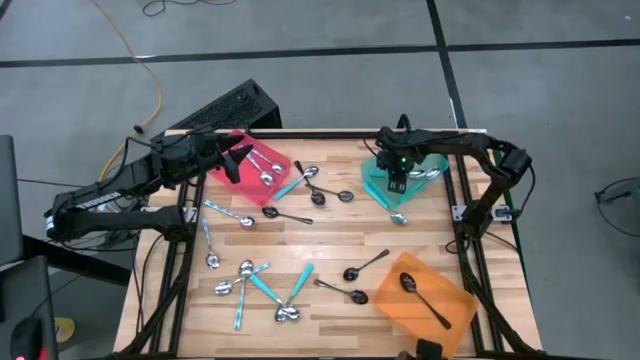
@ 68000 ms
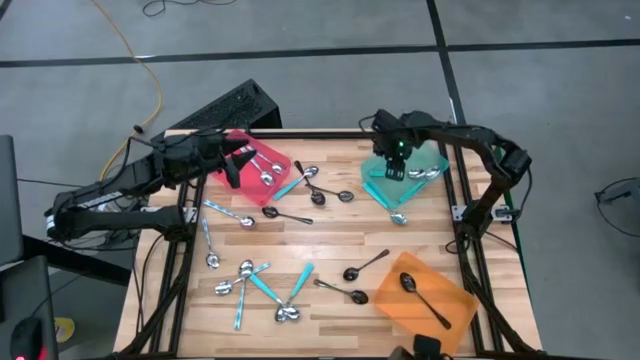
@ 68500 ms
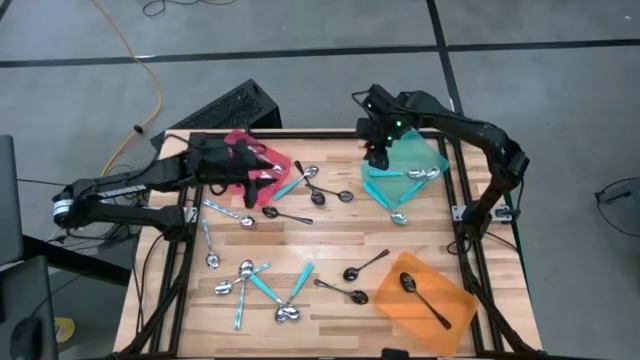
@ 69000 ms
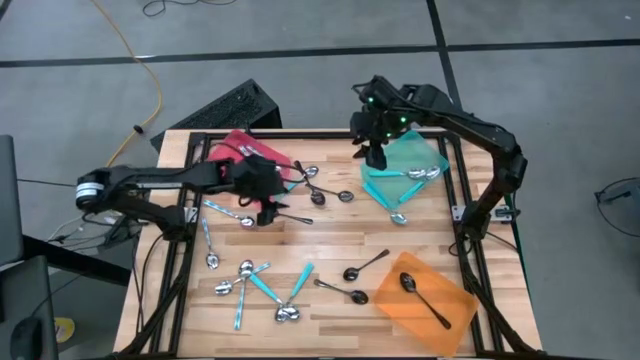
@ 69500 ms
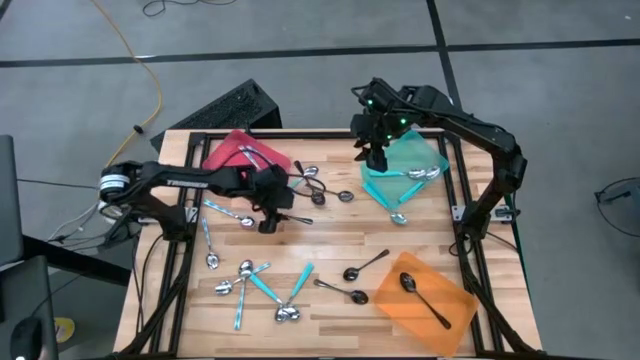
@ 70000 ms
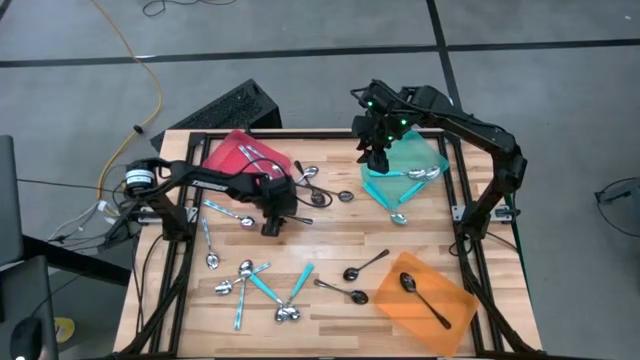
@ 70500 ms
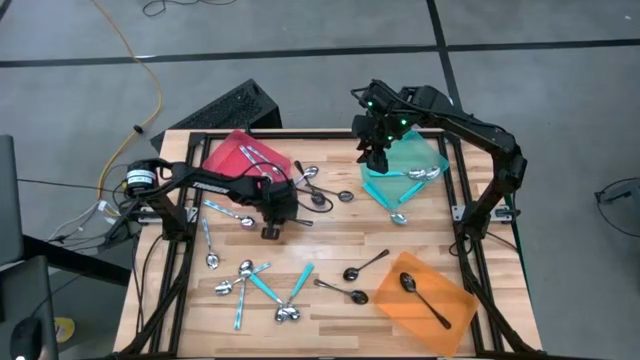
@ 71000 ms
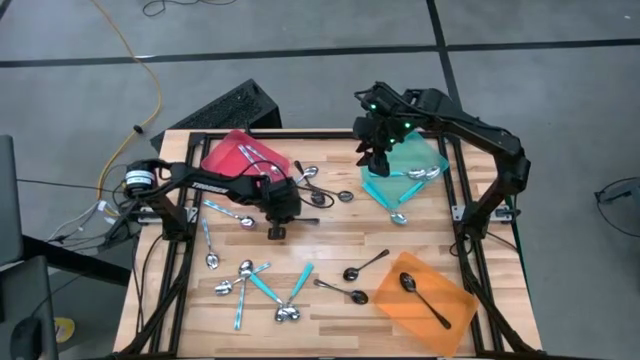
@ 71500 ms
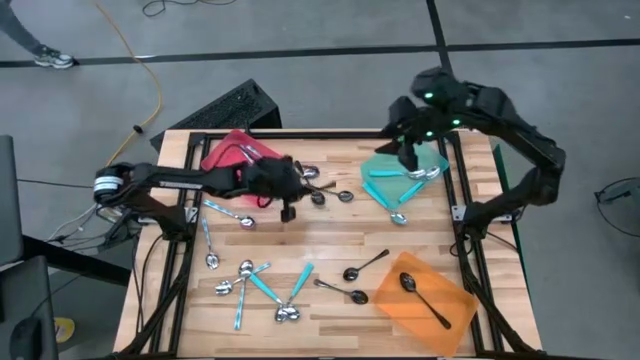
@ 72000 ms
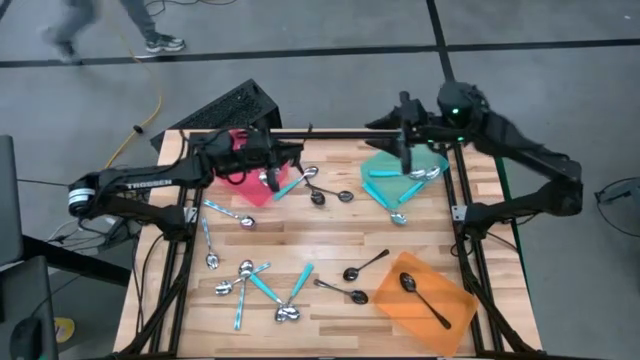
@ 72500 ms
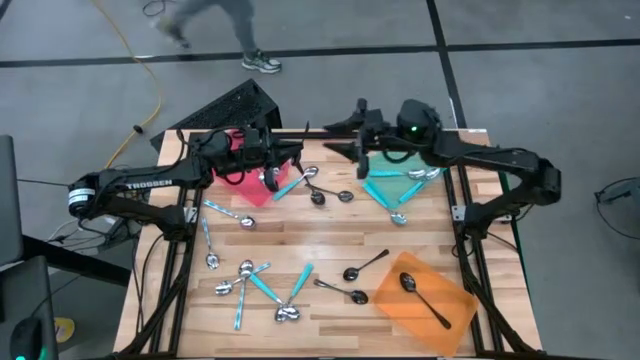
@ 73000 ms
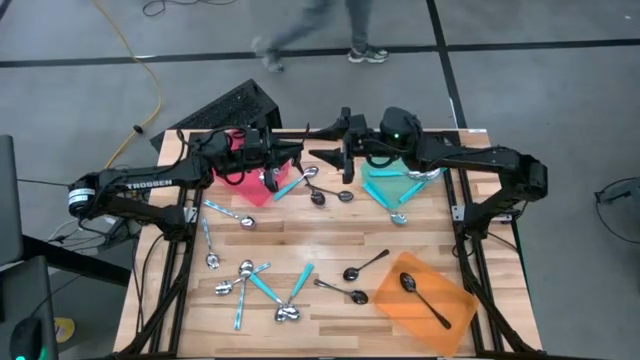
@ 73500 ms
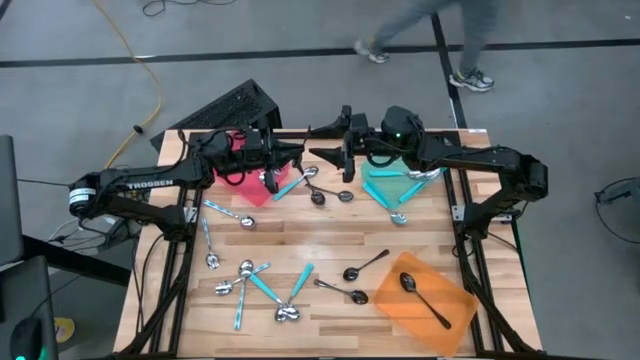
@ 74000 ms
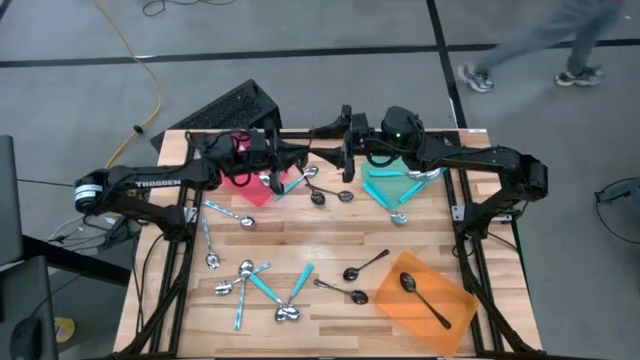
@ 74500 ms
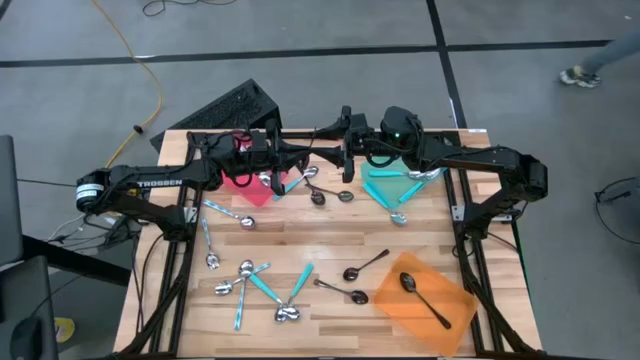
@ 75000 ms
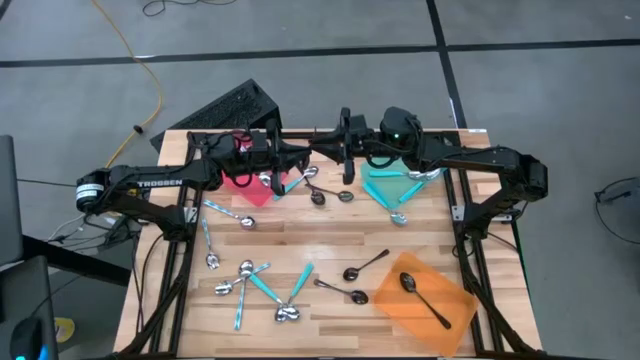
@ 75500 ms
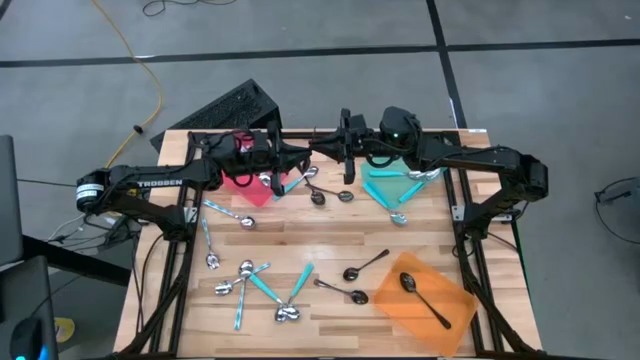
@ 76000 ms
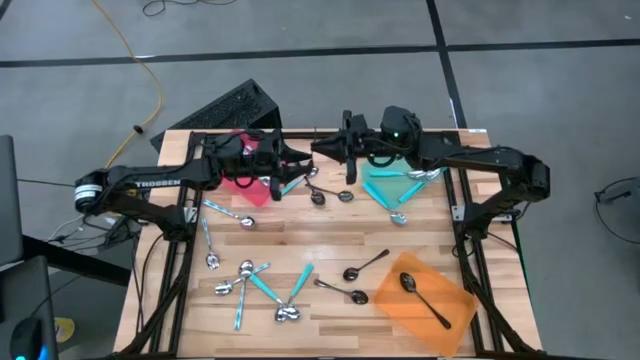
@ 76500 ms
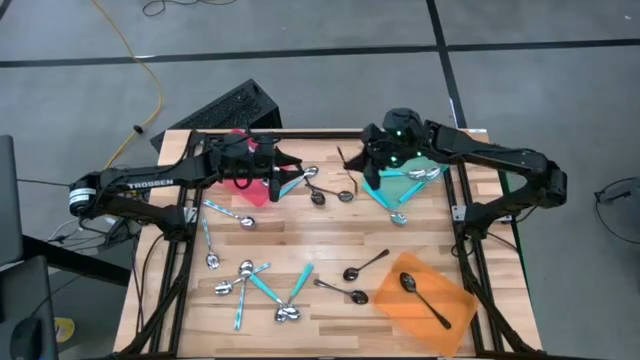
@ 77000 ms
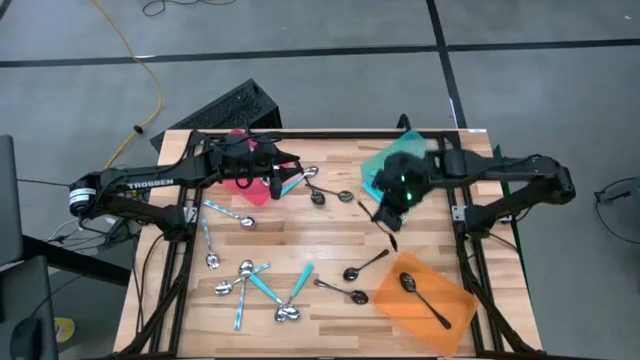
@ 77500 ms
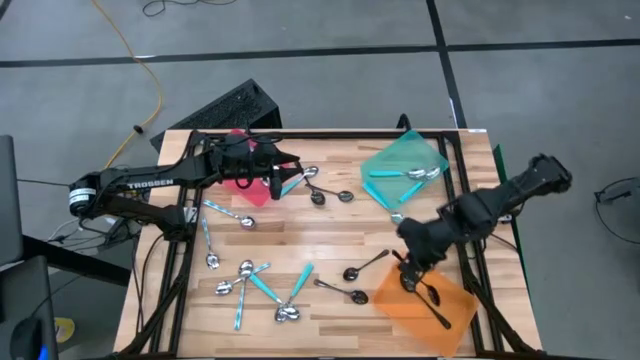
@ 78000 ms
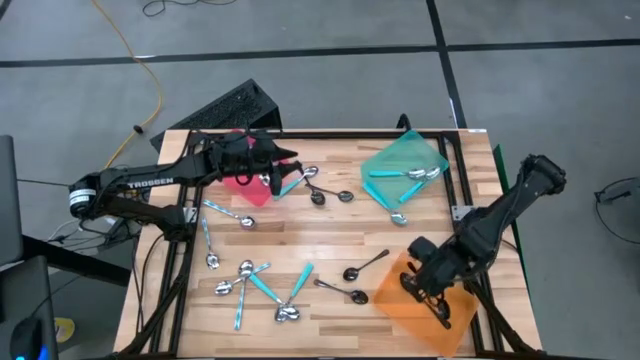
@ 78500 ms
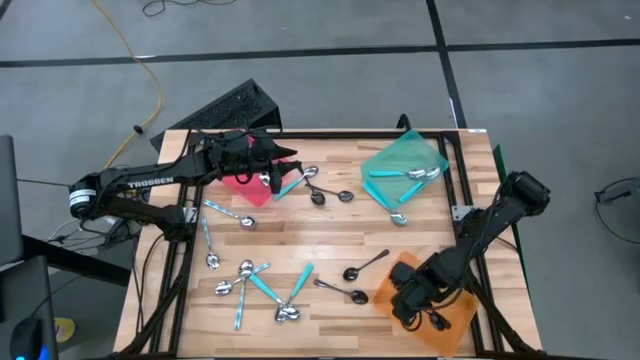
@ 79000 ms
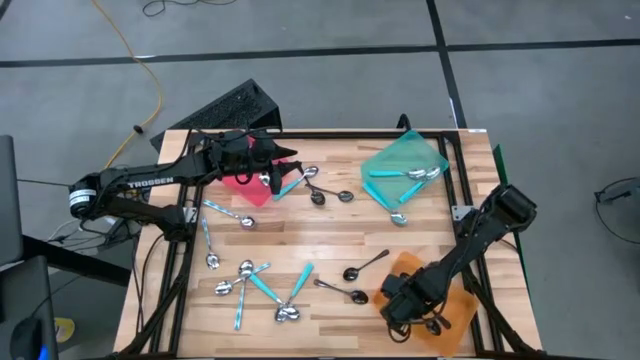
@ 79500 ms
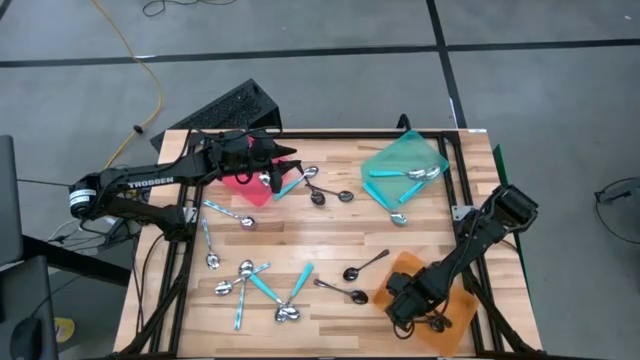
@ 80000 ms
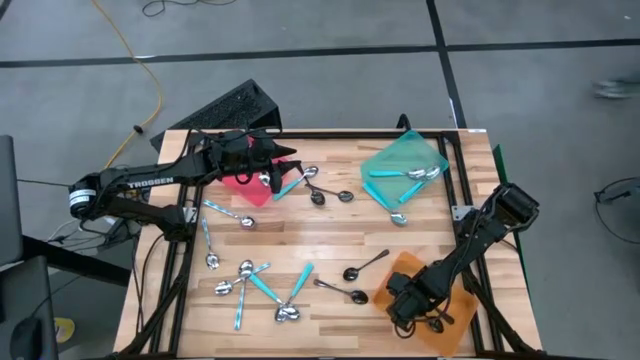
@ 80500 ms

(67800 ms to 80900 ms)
Task: Sort silverware by color (type)
Put the black spoon into the orange bin

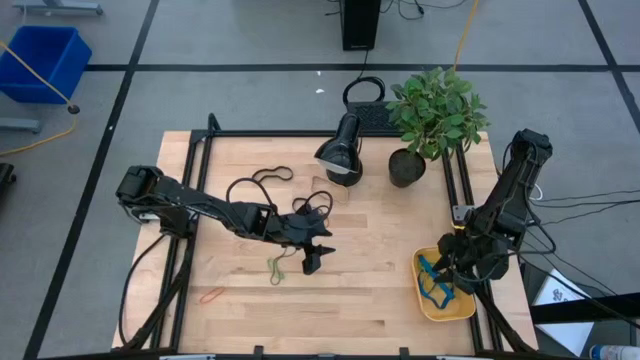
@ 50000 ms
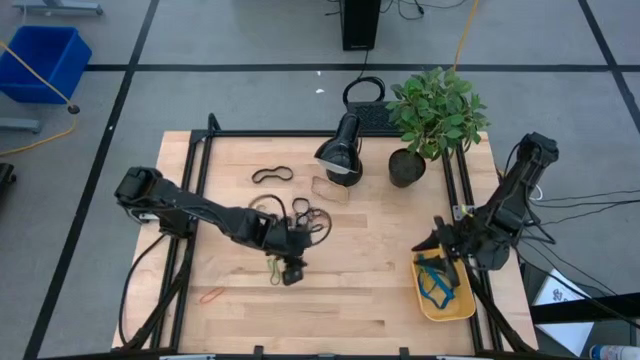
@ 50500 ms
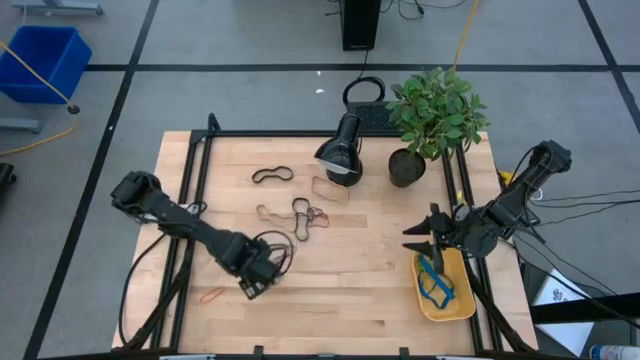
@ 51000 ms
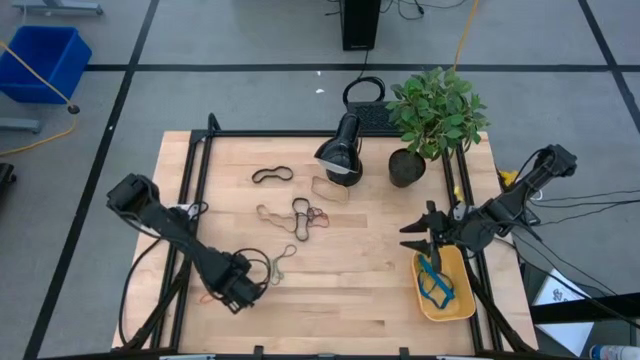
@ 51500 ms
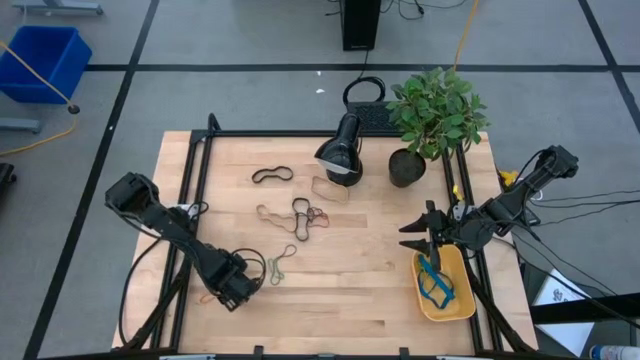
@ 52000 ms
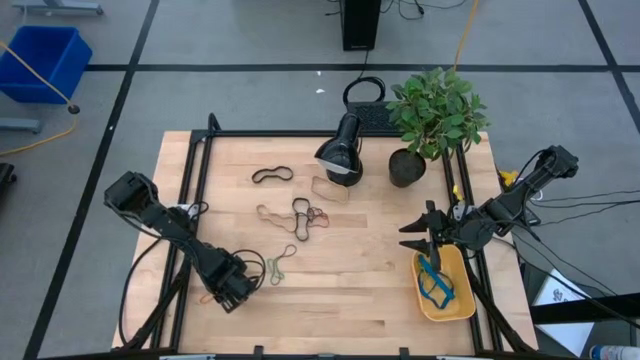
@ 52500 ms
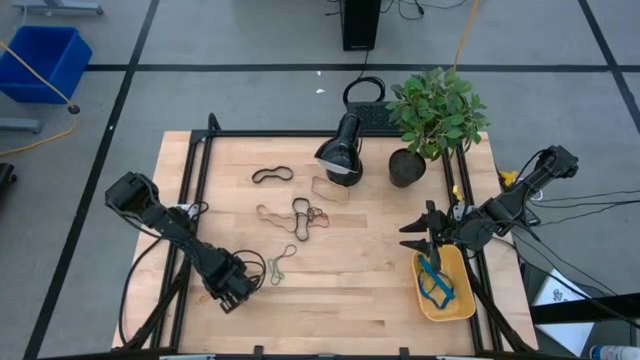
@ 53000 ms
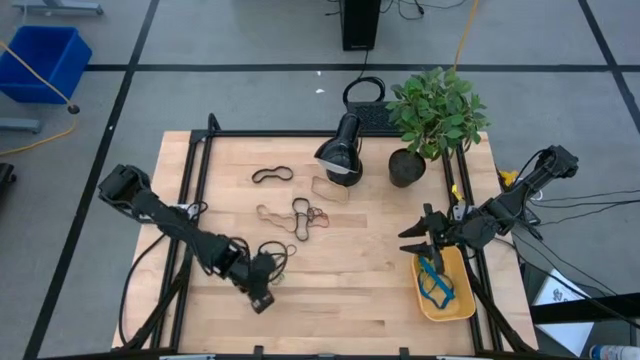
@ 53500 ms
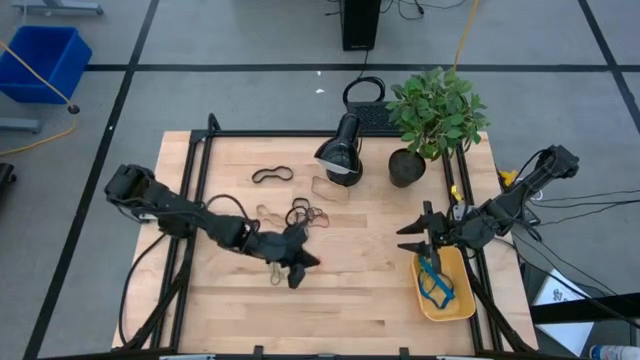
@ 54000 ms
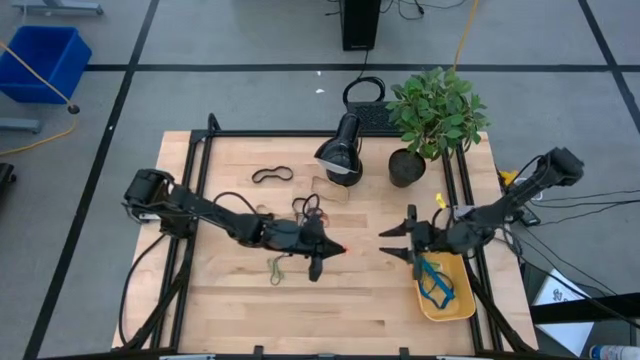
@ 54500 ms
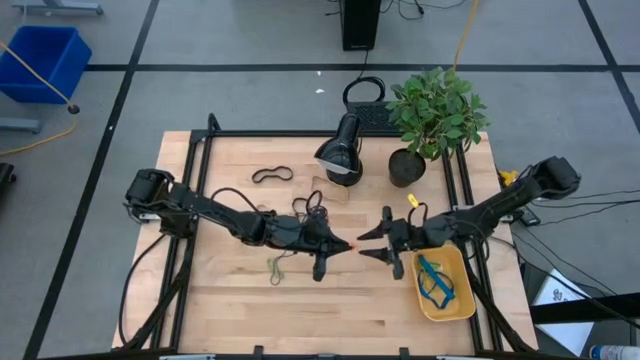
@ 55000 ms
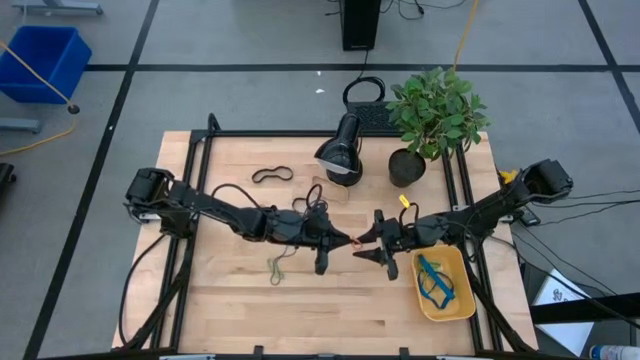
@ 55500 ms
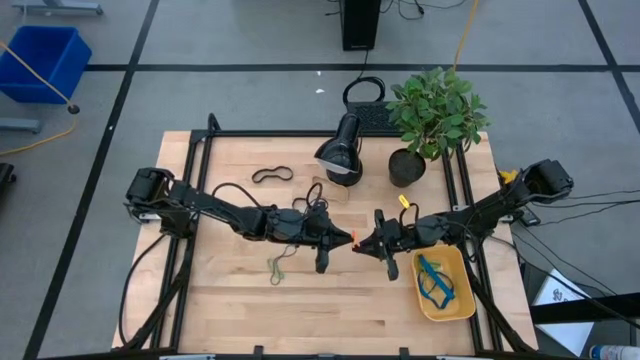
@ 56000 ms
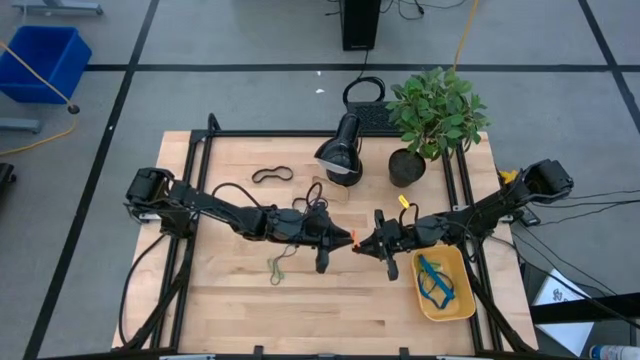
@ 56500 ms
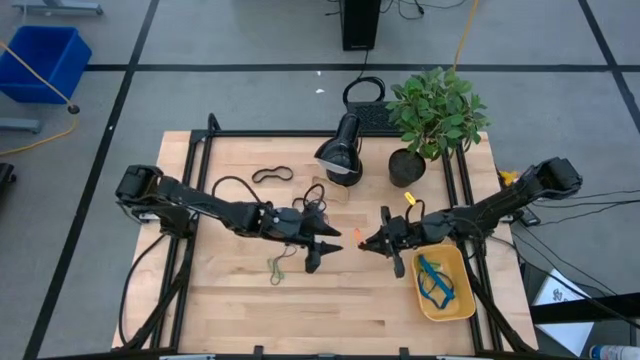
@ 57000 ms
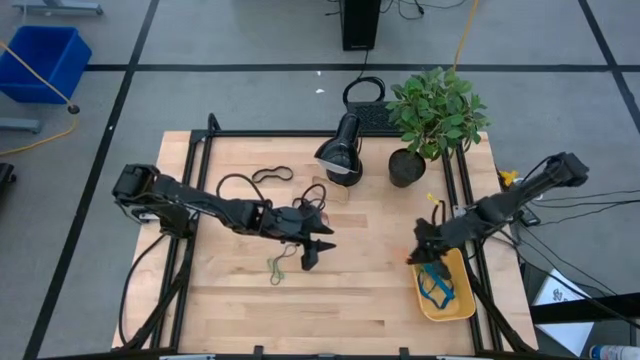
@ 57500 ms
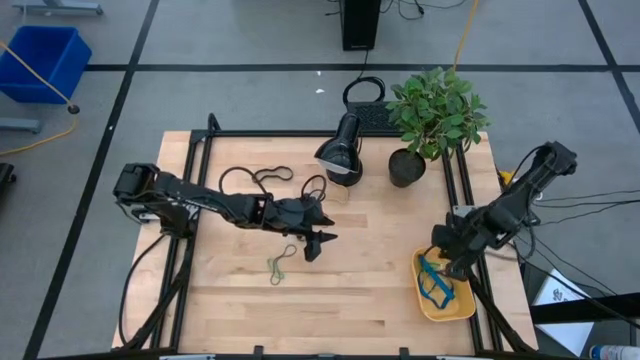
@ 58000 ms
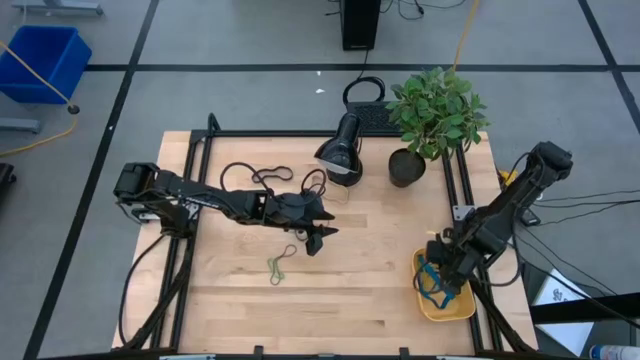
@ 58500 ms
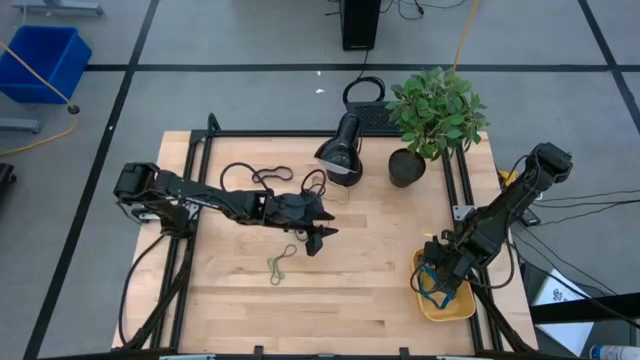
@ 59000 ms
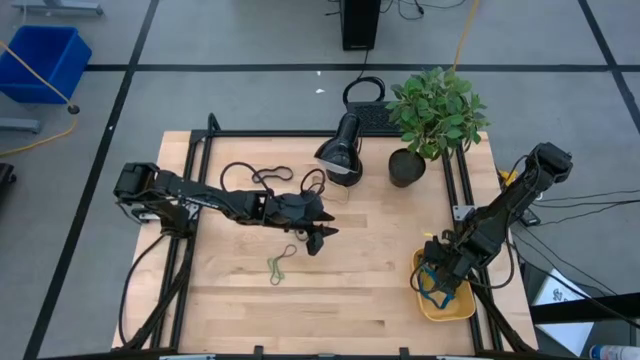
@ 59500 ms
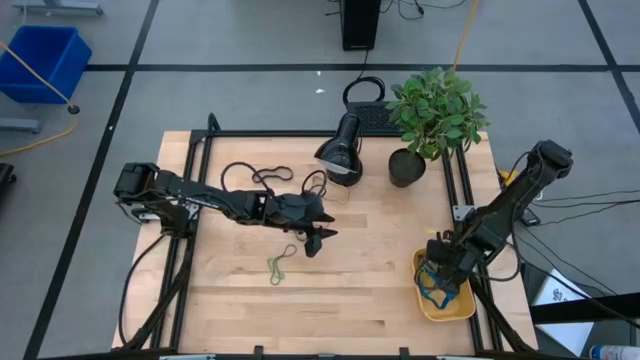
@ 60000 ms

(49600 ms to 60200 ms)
Task: Pick and place rubber bands into bin
Put the orange rubber band into the yellow bin
